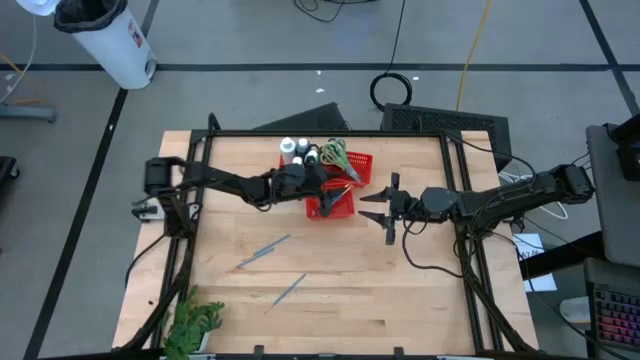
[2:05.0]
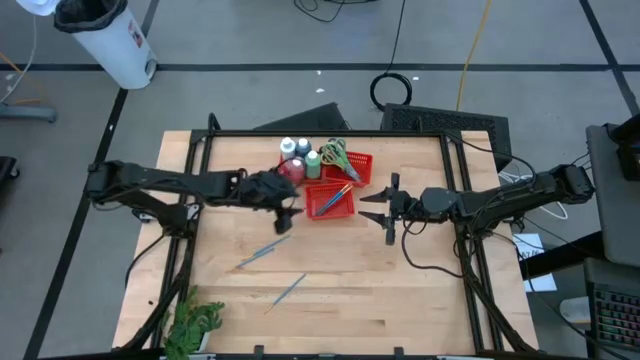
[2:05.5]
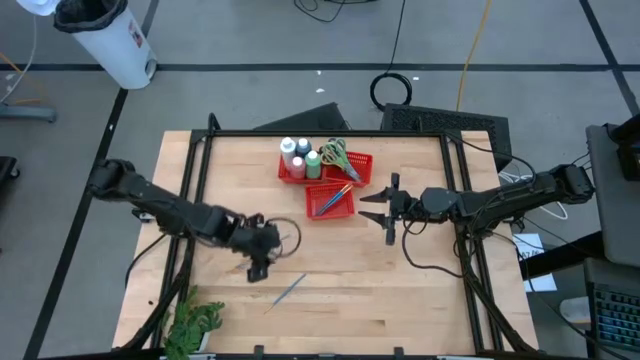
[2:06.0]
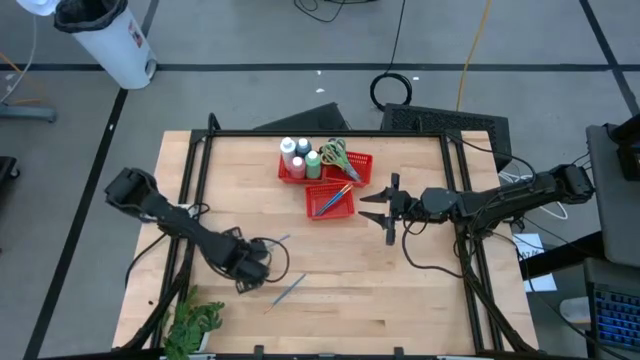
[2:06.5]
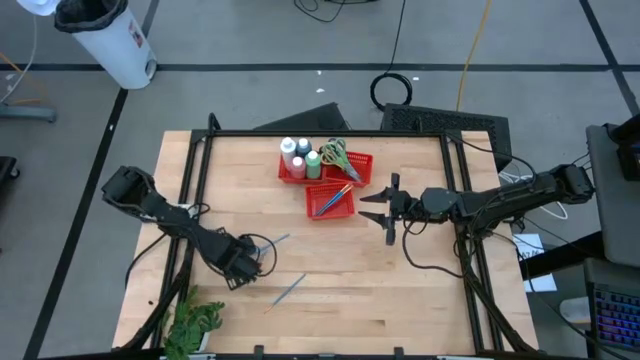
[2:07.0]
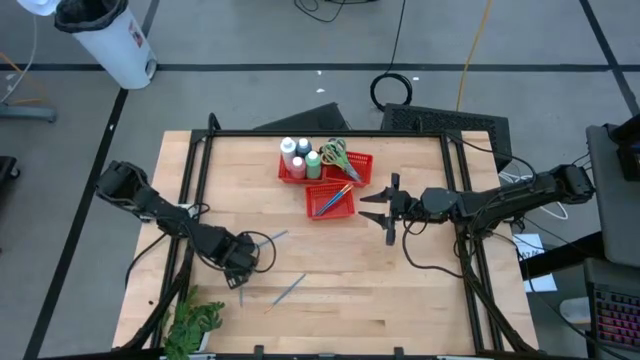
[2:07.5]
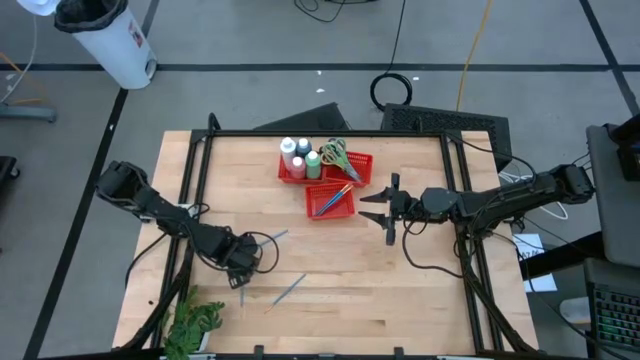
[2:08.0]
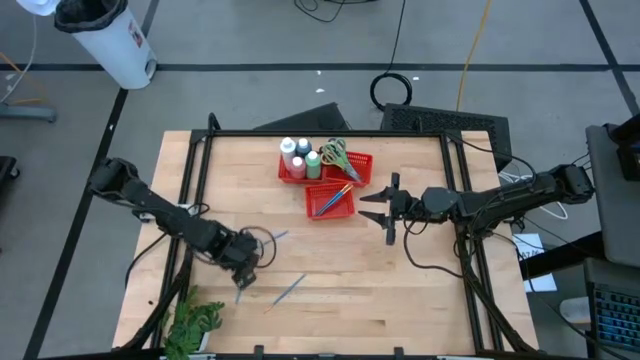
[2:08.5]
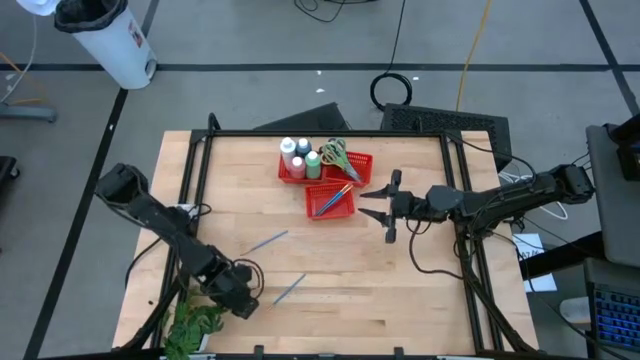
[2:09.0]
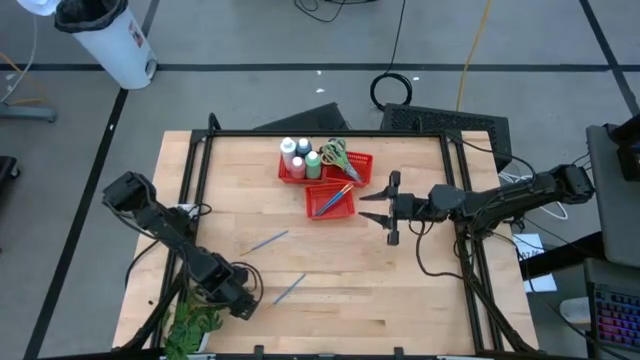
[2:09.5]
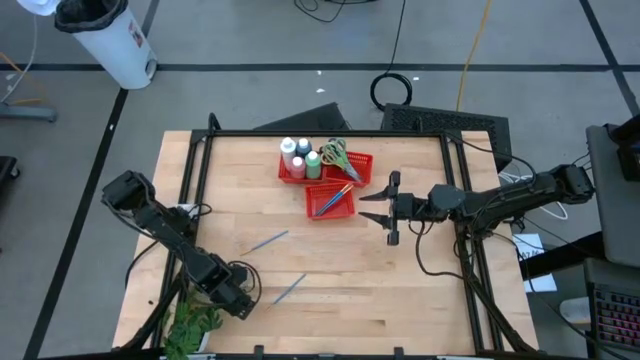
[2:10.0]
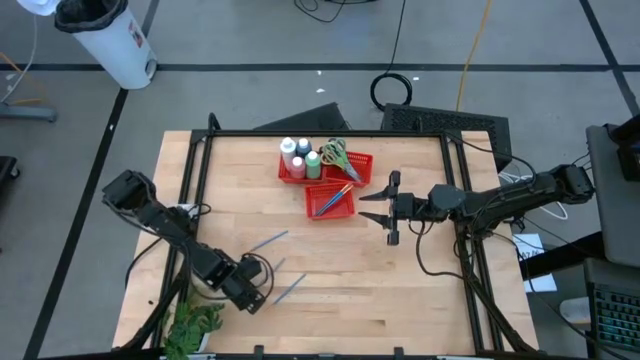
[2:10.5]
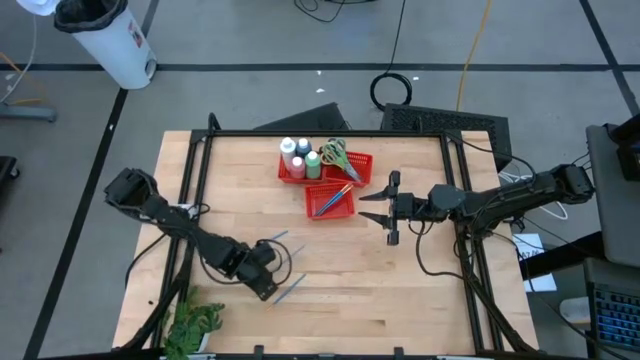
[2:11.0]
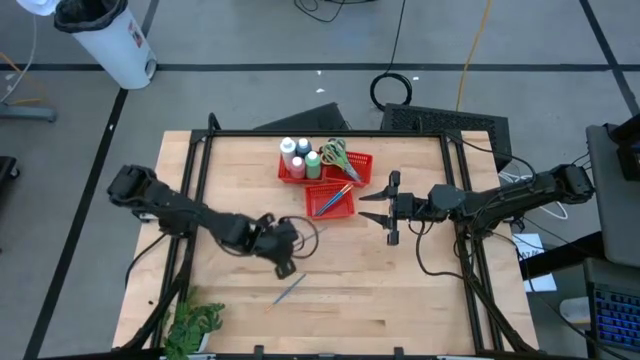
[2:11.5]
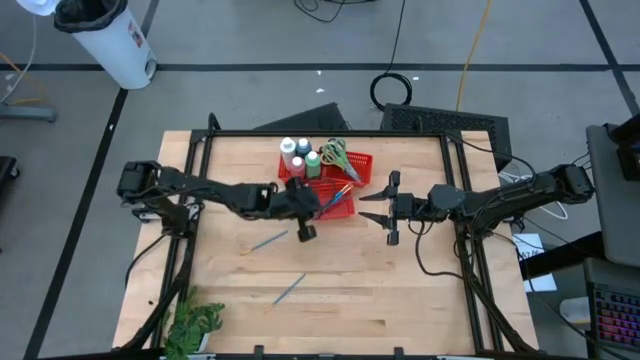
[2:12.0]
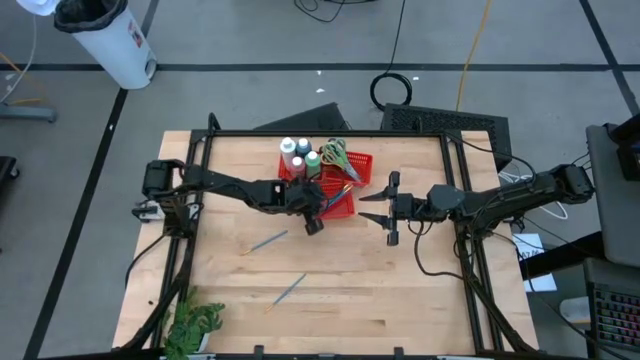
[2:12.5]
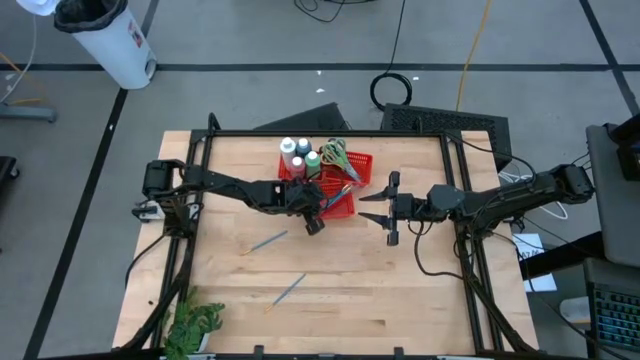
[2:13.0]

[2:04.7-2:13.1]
Task: Pick & Place Paint Supplies
Put the blue paint brush into the bottom red bin

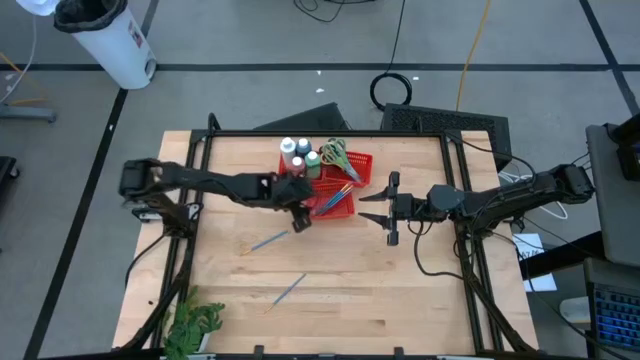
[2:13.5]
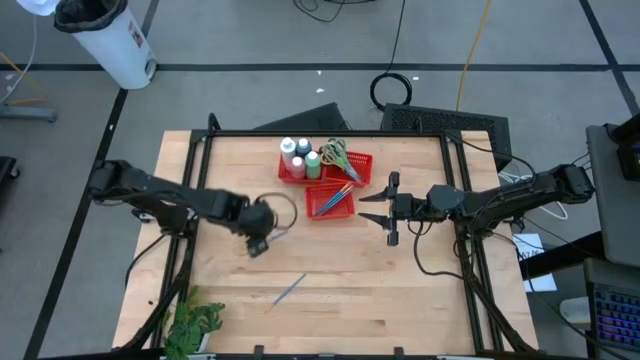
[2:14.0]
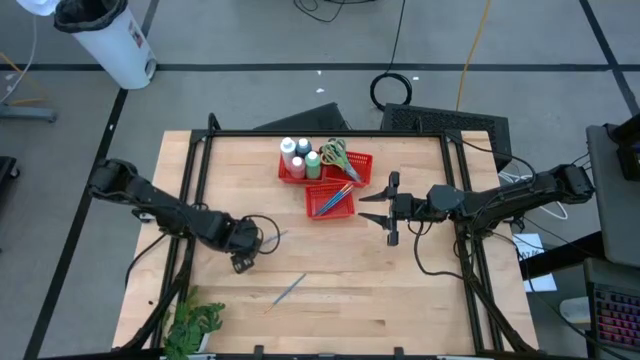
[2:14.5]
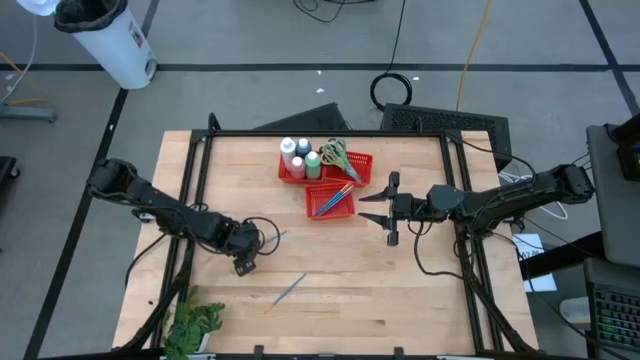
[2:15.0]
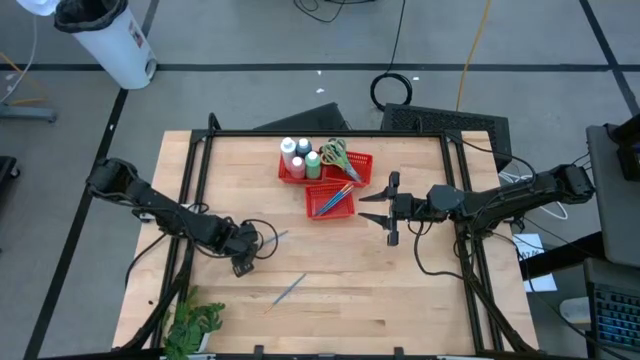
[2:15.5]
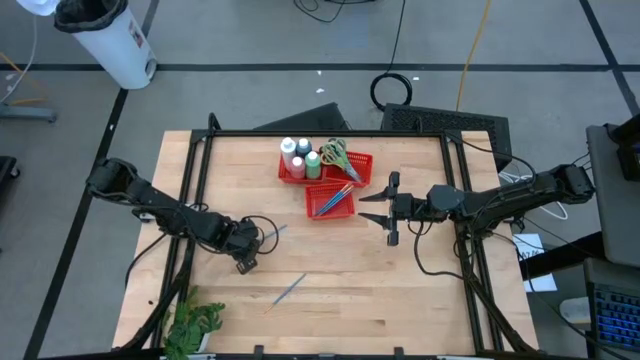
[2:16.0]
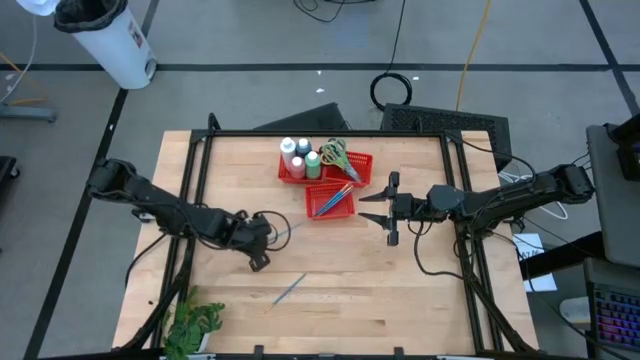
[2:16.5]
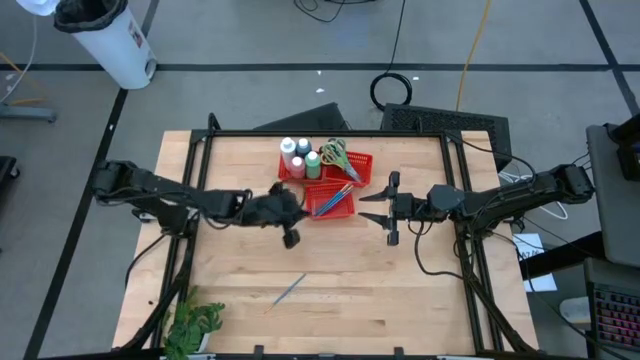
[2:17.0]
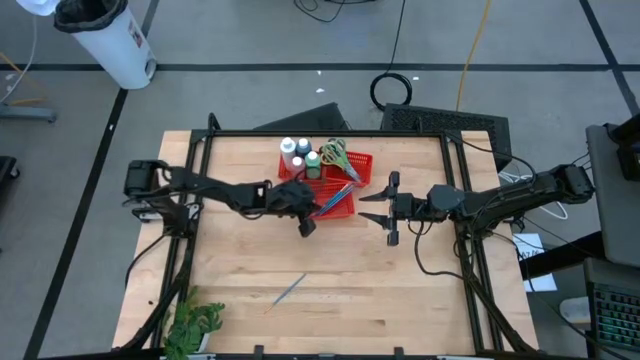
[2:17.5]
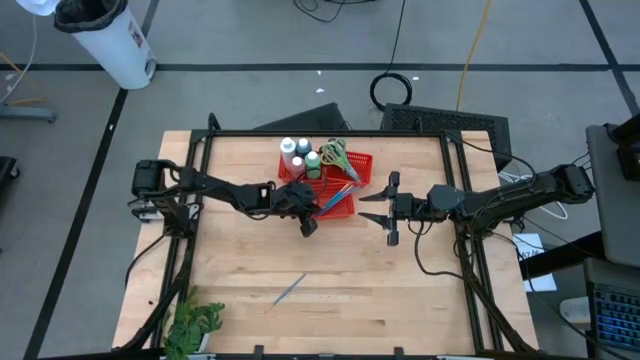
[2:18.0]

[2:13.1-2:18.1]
Put the blue paint brush into the bottom red bin

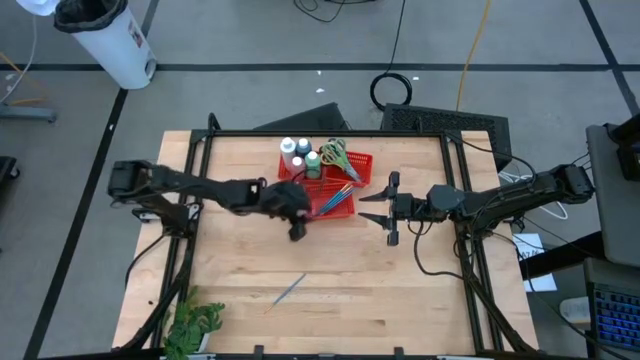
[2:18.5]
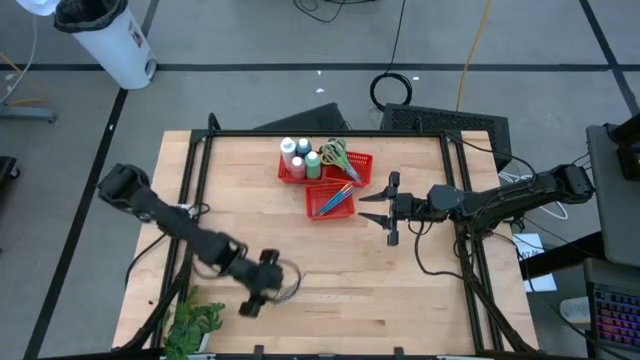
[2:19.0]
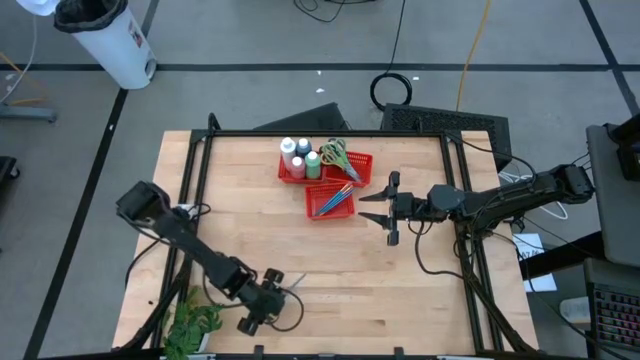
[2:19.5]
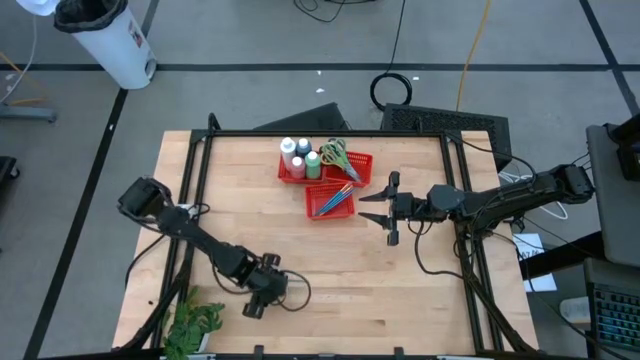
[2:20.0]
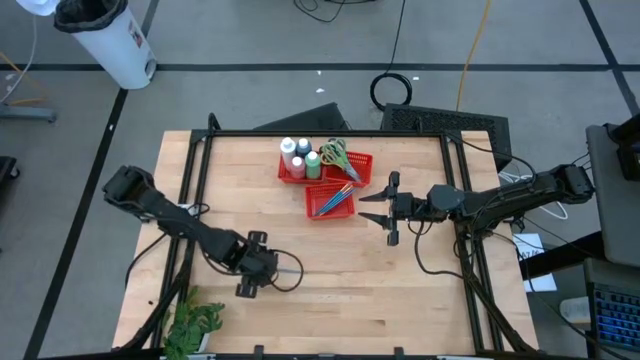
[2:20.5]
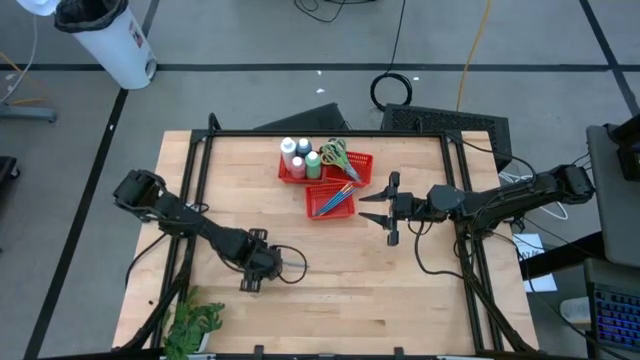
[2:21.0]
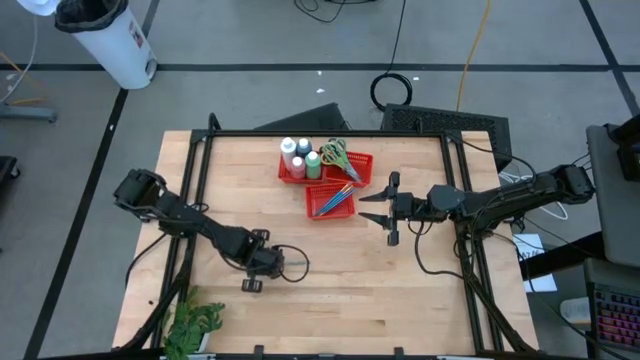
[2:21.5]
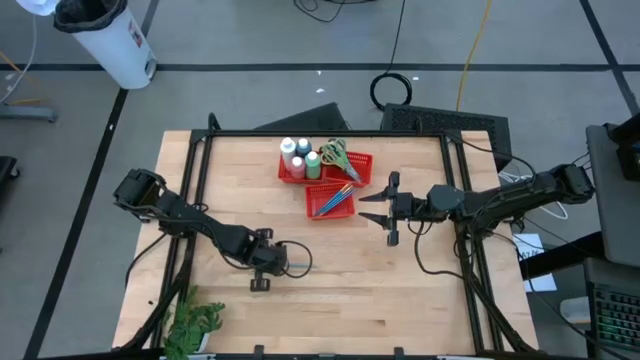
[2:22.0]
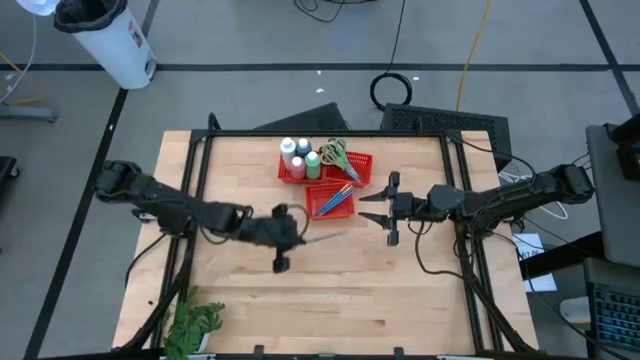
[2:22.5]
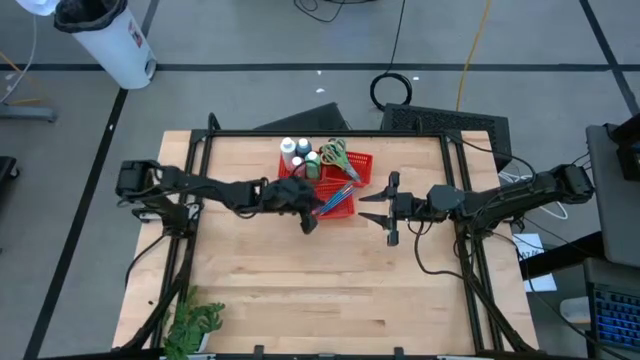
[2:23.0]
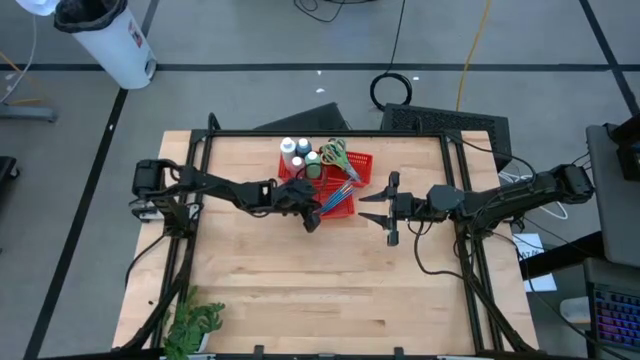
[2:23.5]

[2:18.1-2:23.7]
Put the blue paint brush into the bottom red bin

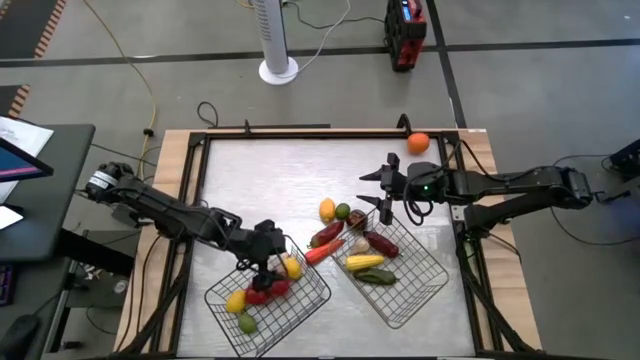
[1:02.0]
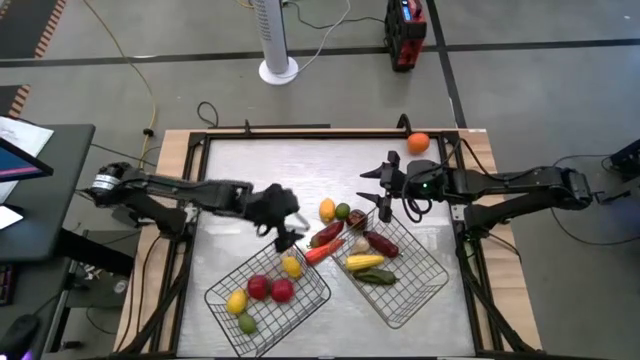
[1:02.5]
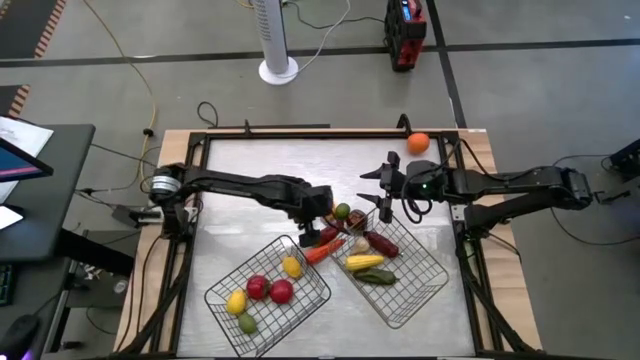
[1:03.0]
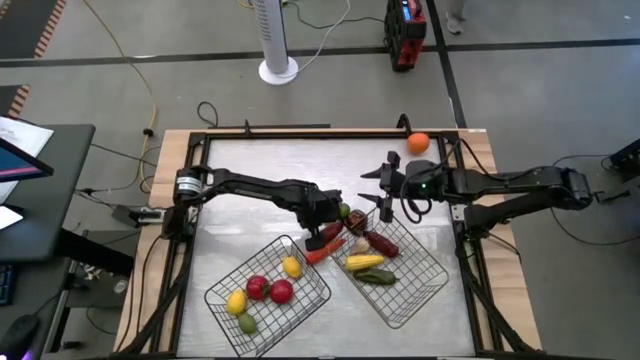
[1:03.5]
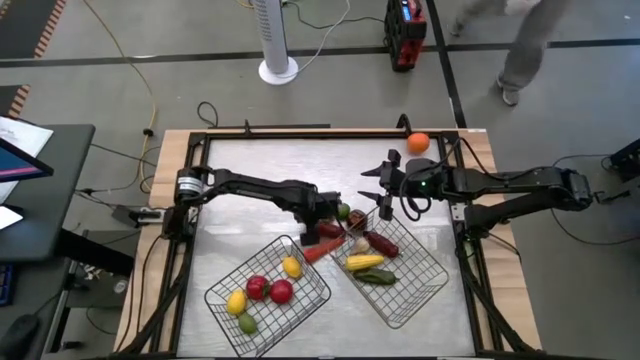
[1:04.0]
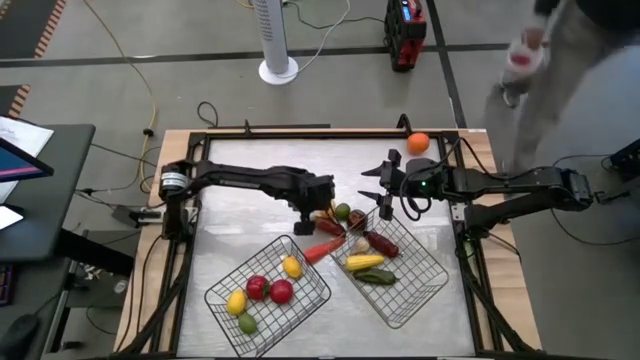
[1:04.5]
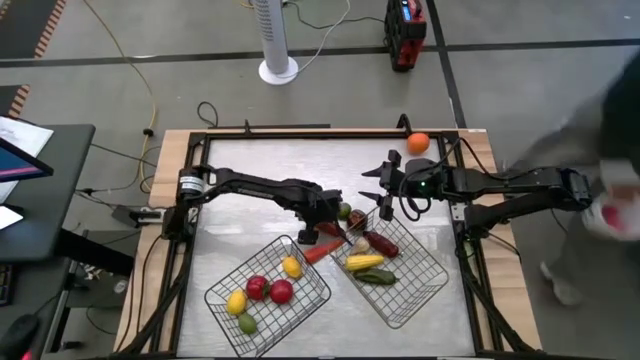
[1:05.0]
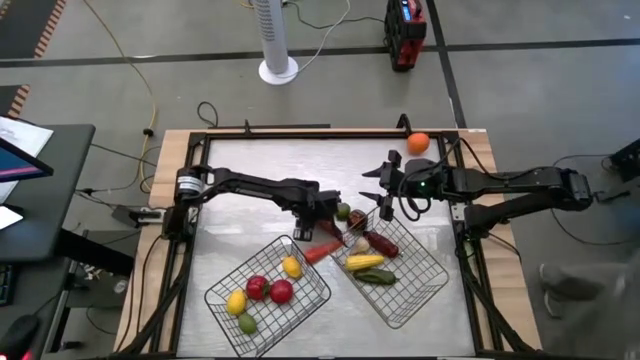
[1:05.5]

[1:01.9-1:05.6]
Task: Sort produce into baskets
Put the red chili pepper into the gold wire basket
